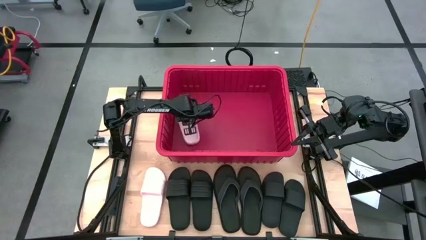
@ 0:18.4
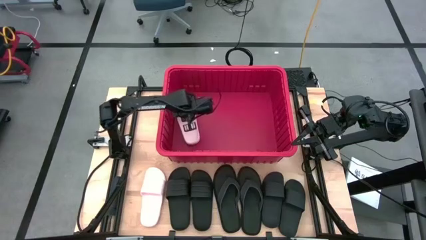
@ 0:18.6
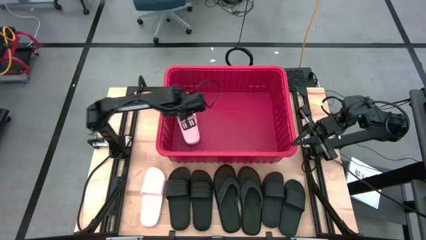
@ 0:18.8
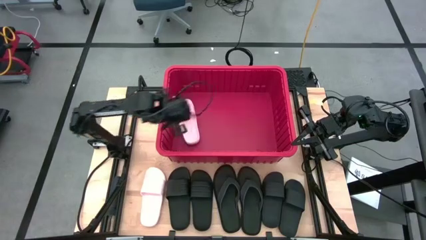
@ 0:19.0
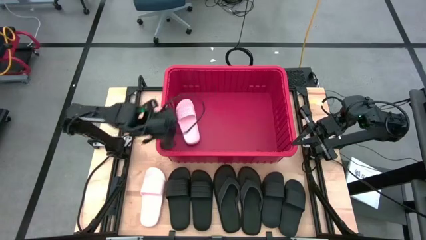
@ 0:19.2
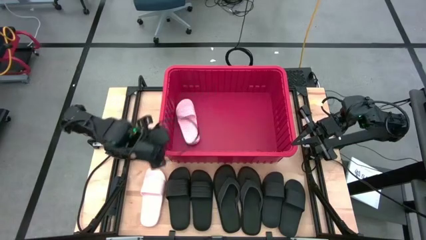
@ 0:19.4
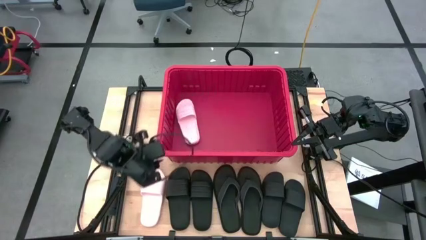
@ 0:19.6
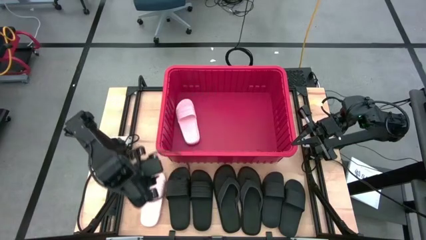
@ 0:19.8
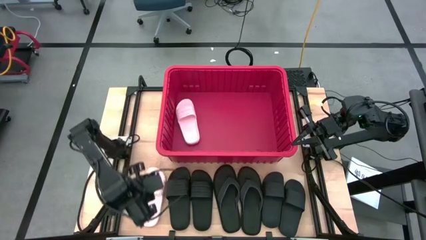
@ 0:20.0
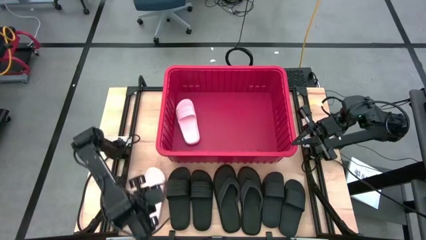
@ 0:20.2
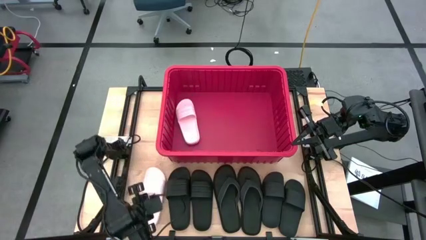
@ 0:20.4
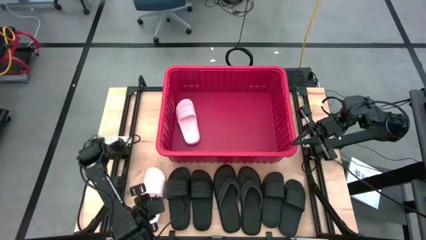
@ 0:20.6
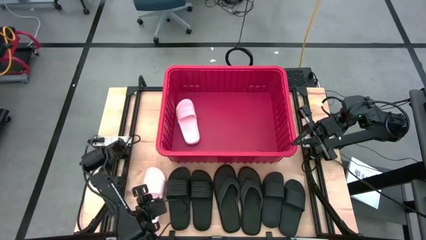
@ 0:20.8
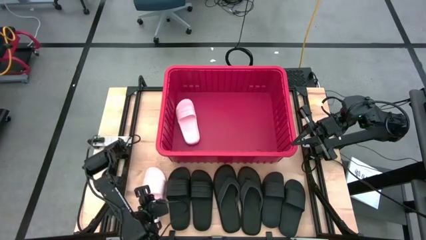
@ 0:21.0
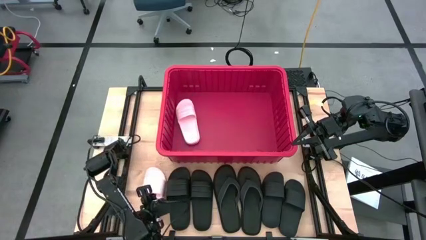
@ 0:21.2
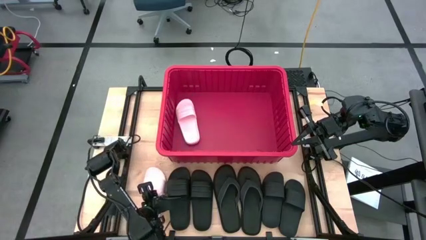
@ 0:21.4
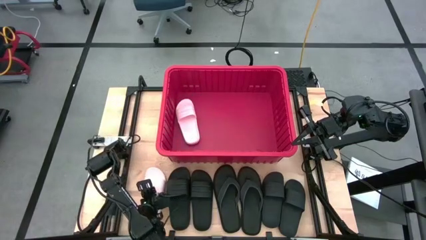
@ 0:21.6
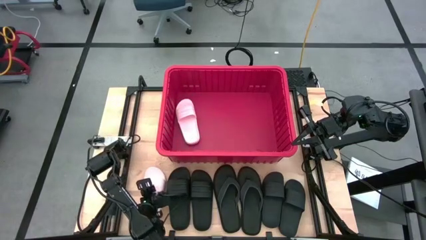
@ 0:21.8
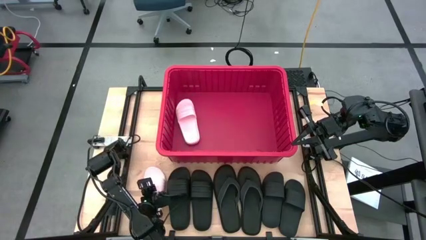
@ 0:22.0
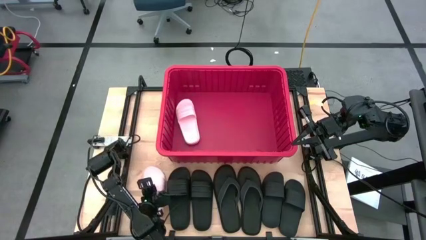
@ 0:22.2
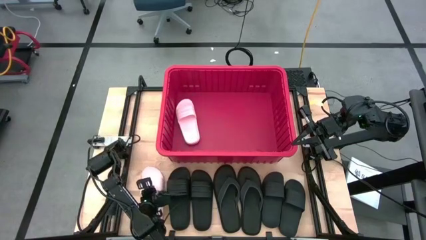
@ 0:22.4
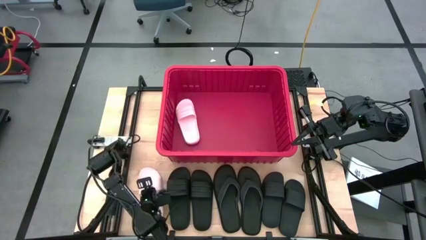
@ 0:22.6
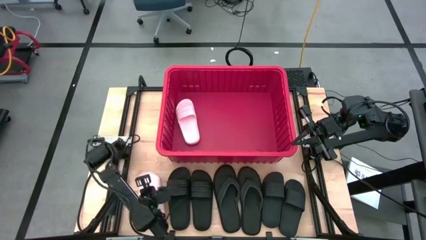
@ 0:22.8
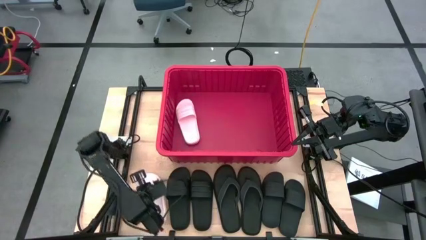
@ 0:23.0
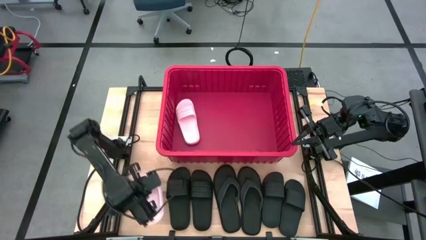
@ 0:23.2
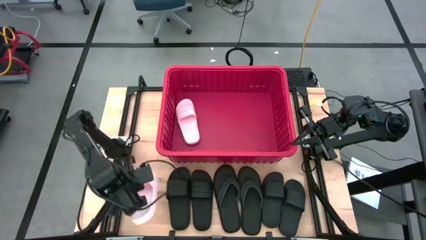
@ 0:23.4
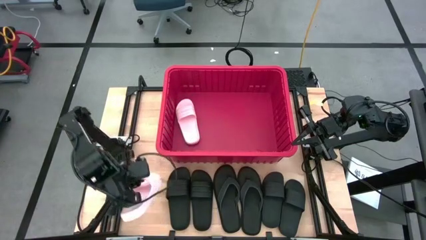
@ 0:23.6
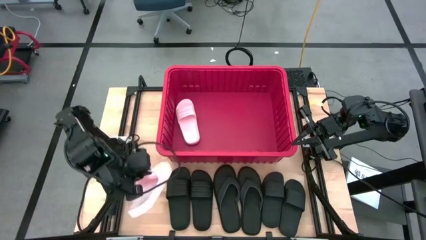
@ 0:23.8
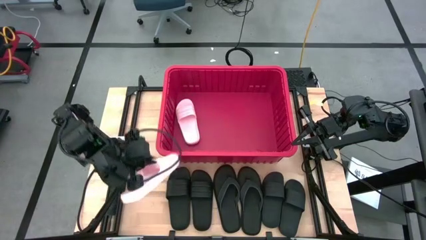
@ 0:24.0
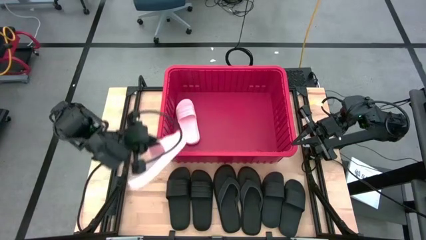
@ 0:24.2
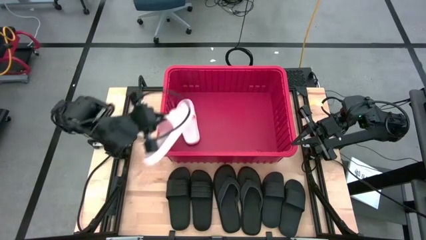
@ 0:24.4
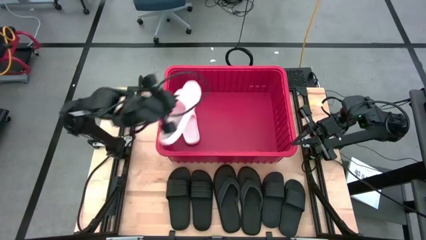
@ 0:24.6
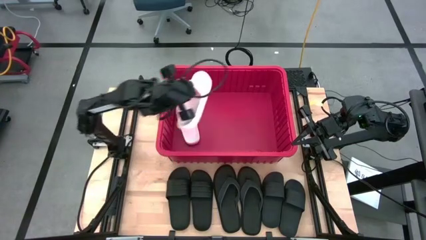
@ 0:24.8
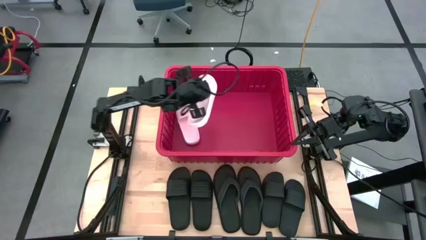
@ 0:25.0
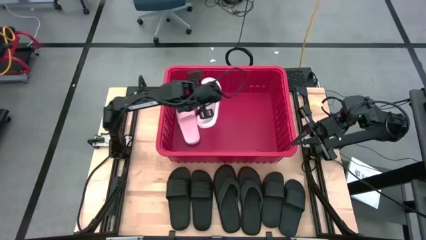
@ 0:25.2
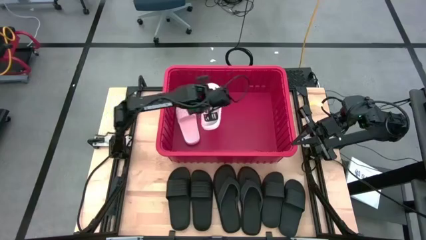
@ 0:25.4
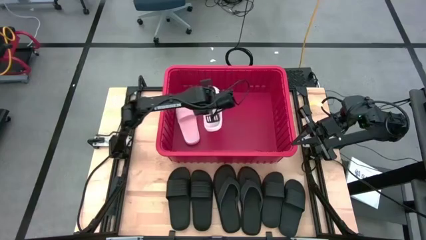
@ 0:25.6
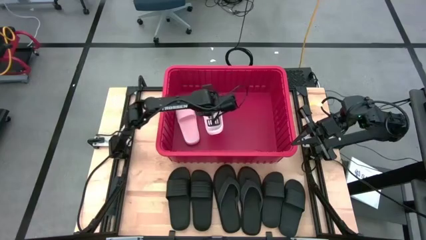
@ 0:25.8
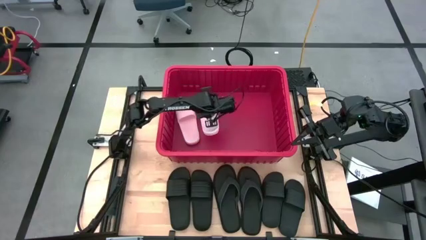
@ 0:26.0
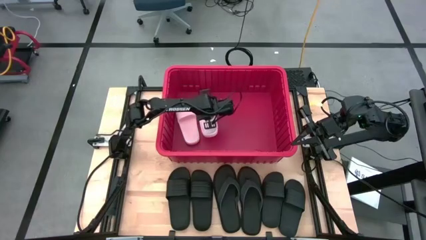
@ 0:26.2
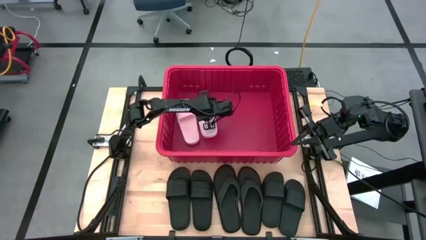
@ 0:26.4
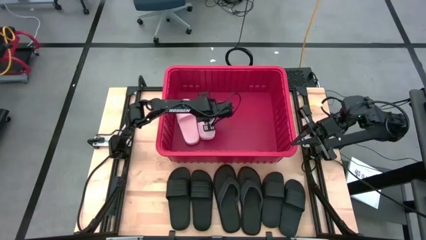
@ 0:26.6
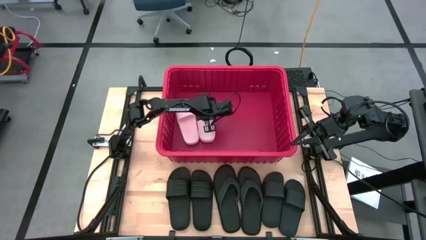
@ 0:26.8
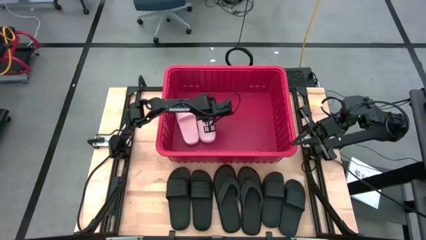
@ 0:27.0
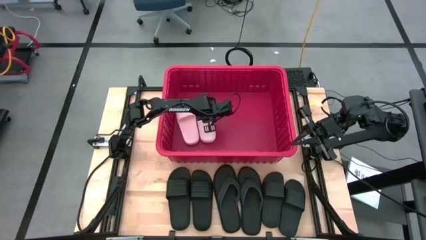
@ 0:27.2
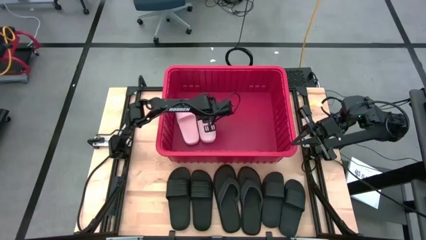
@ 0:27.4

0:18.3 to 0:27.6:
Task: Pick and place slides into bin
Put the pink slide into the bin

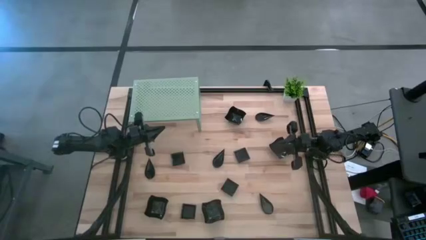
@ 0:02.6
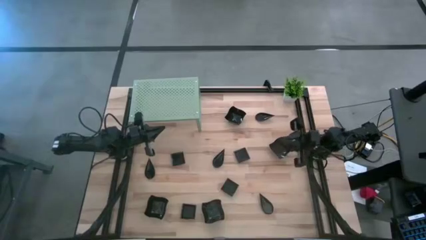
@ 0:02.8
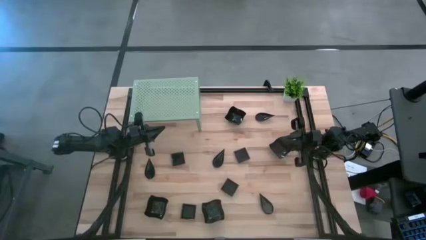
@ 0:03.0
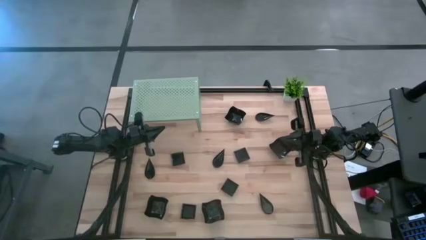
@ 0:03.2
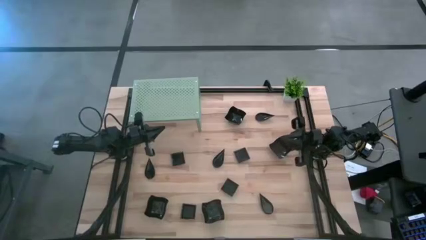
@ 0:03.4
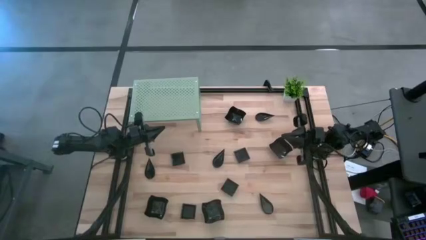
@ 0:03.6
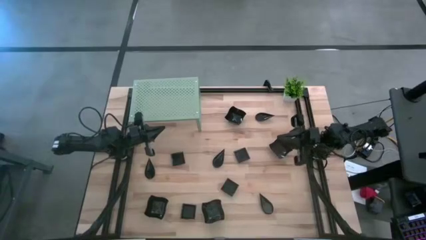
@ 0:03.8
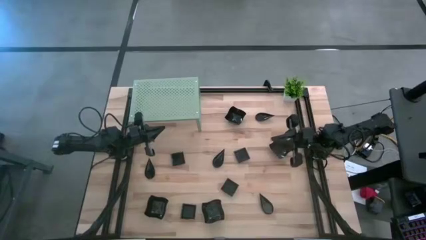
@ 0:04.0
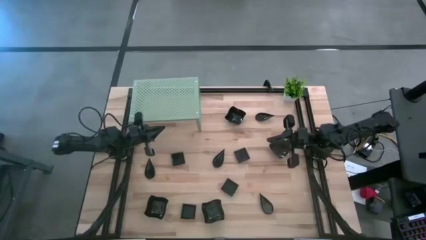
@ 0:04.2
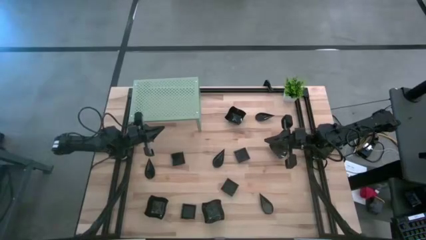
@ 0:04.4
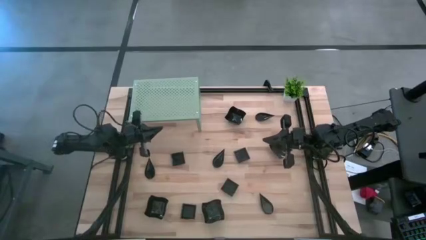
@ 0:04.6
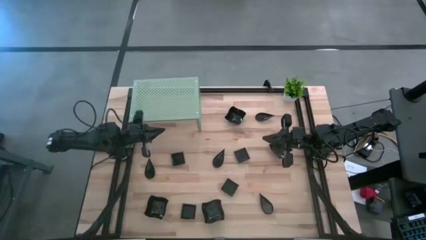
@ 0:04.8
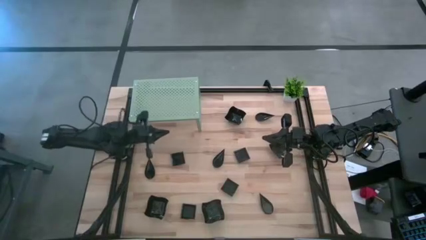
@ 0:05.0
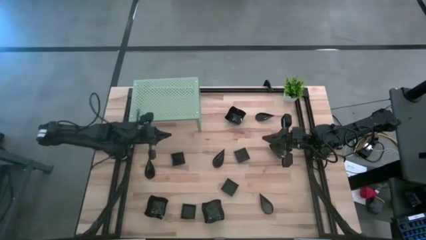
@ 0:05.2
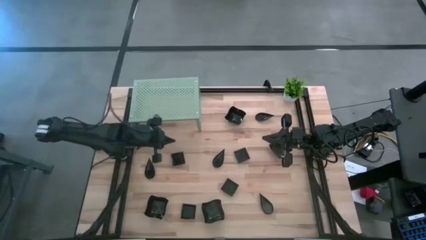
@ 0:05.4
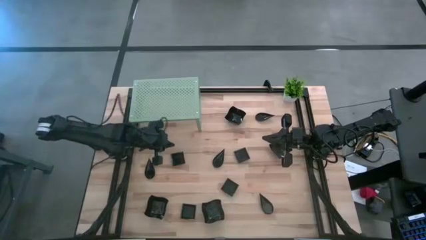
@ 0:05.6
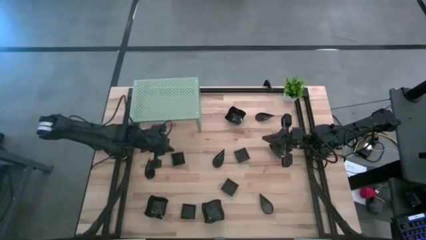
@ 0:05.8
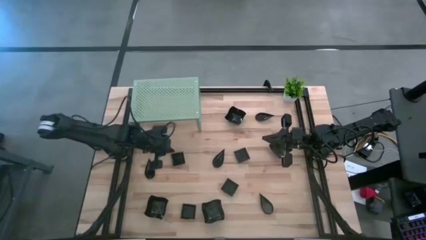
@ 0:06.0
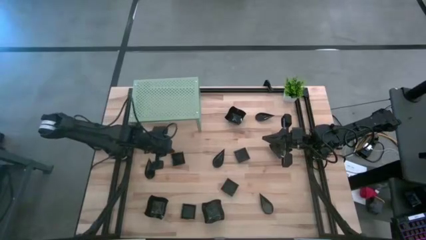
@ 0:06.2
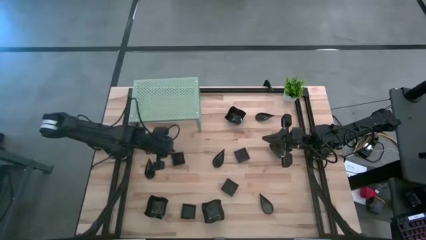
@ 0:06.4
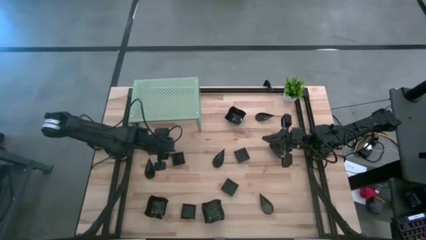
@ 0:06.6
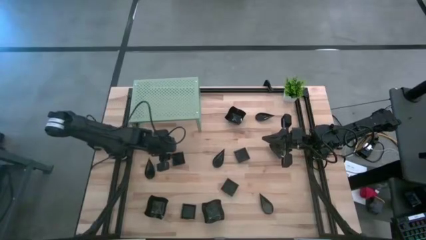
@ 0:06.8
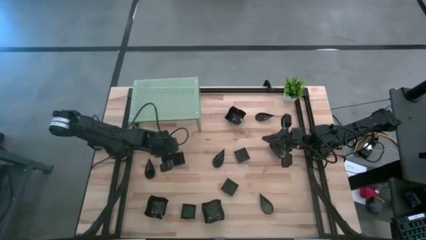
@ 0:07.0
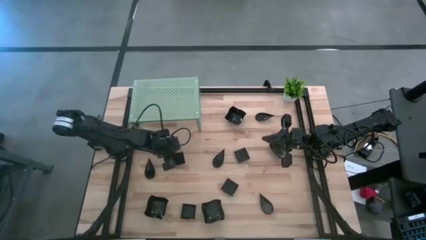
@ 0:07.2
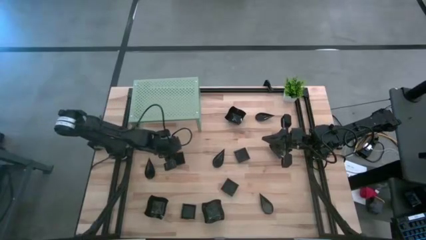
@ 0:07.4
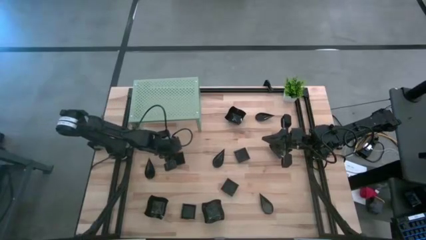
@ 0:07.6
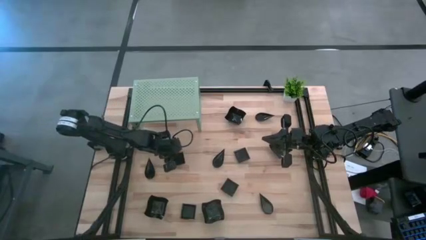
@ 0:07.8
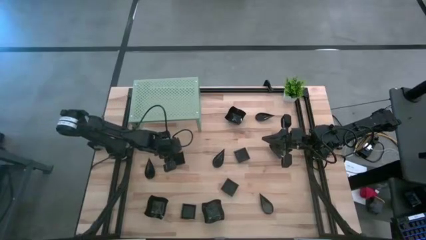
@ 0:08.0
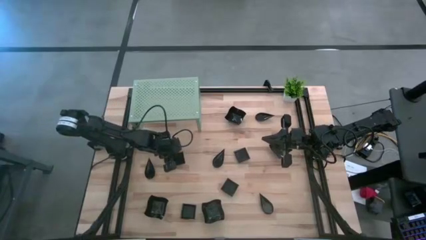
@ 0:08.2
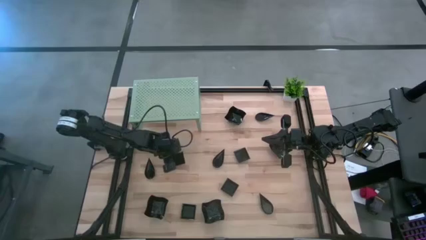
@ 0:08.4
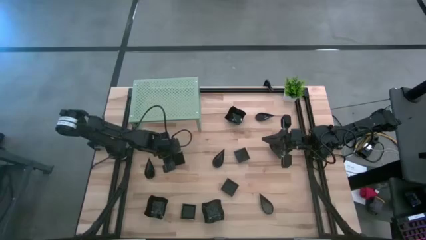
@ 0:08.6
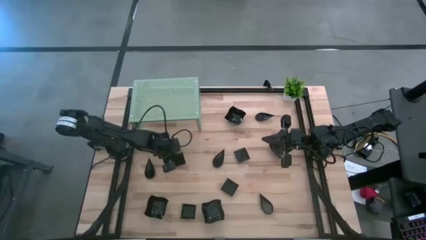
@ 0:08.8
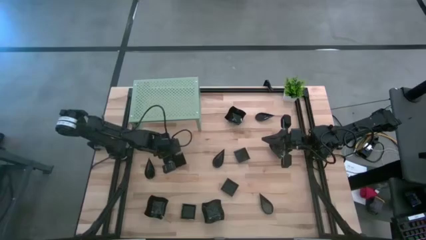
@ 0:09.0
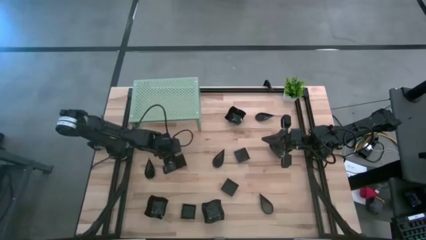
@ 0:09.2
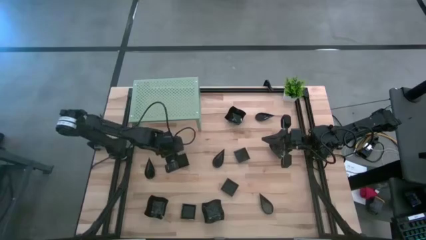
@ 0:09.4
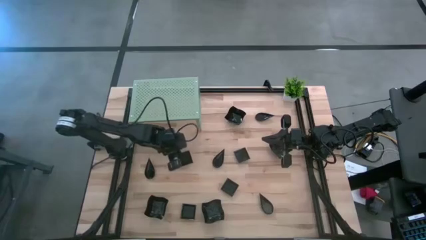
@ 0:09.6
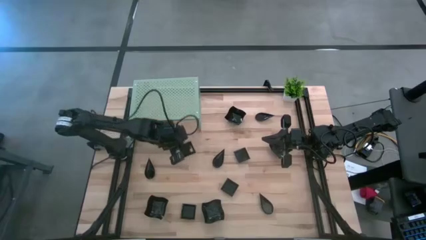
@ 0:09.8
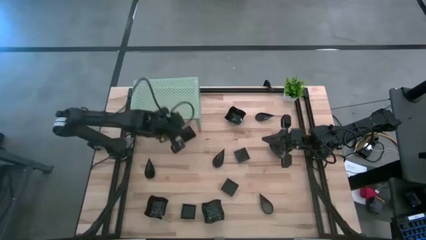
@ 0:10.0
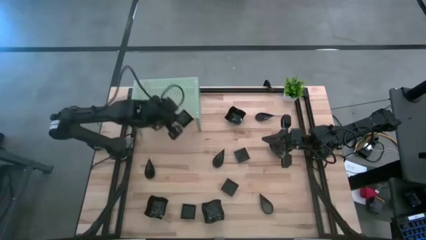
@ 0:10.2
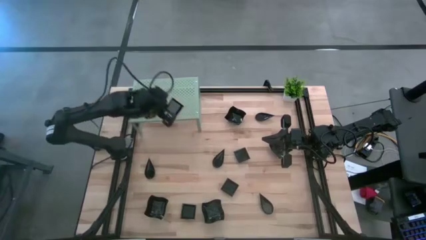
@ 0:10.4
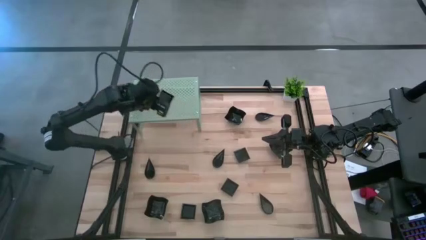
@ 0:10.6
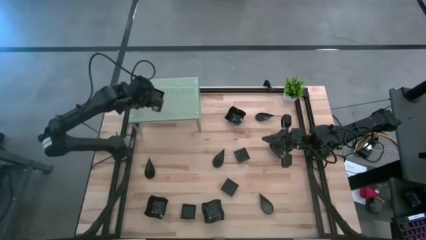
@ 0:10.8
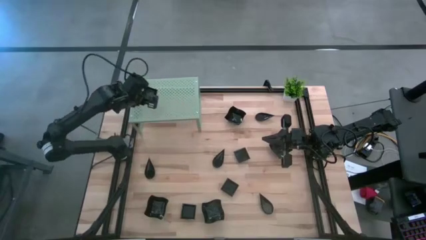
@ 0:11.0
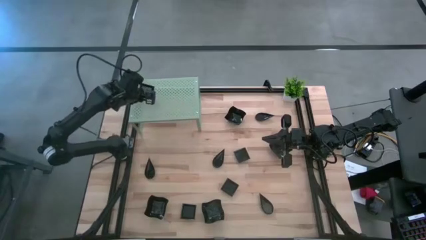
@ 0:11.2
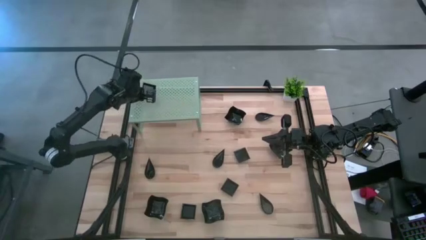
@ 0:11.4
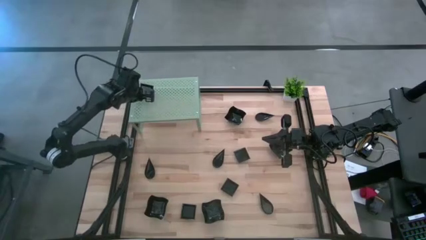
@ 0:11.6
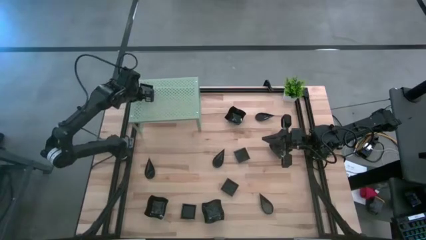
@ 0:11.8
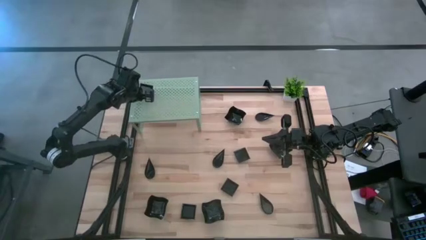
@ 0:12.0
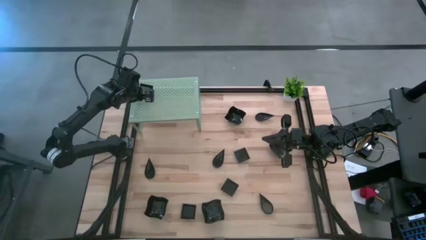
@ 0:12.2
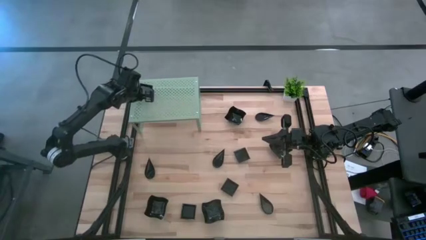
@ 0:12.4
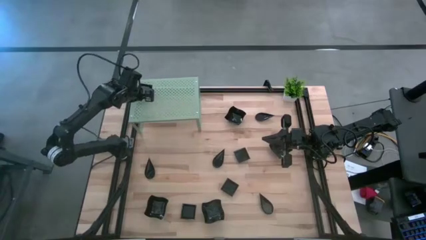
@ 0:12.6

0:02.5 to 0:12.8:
Task: Pick & Place Mini shaped plates
Put the black square plate on the shelf
